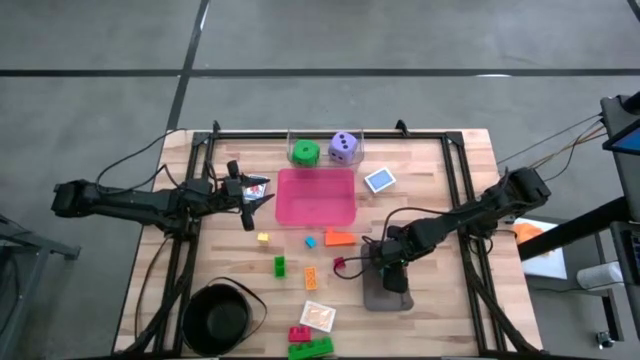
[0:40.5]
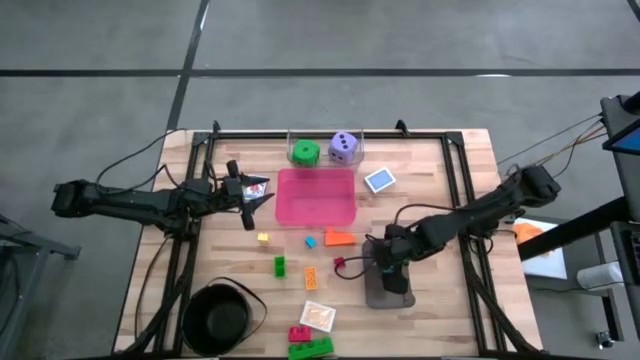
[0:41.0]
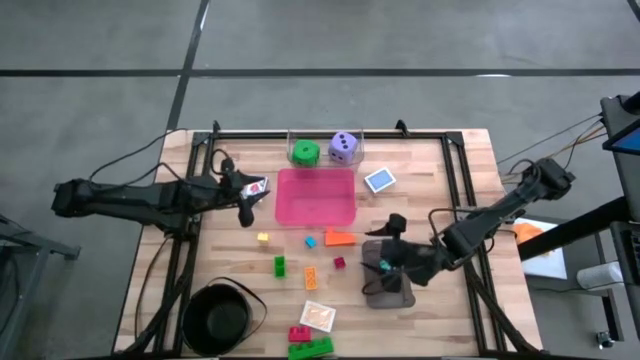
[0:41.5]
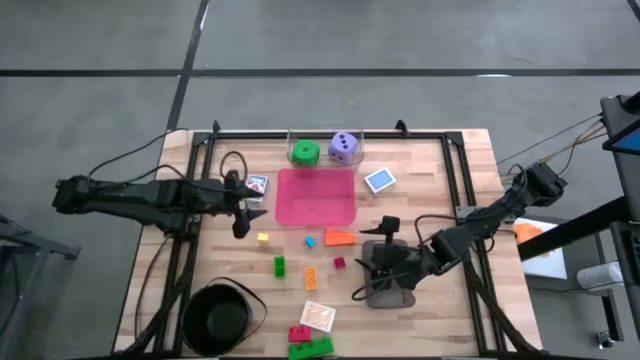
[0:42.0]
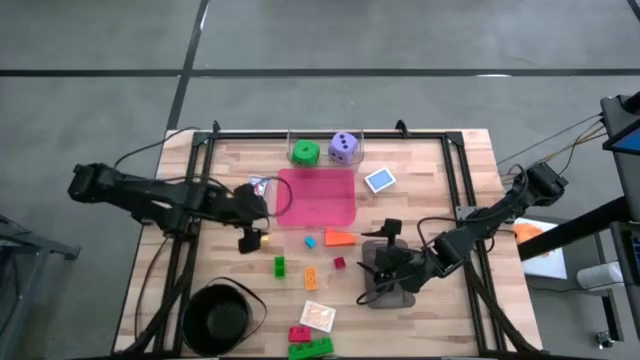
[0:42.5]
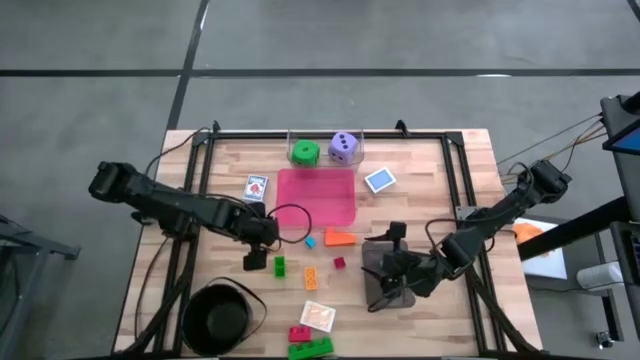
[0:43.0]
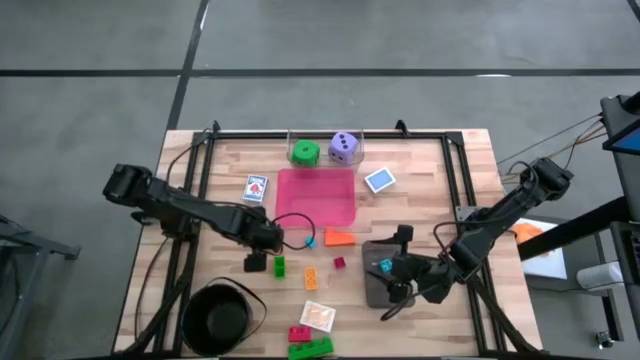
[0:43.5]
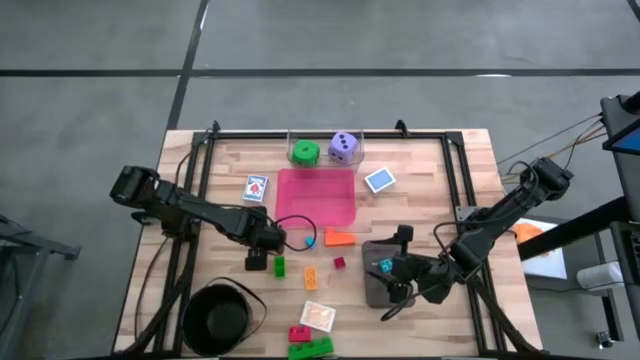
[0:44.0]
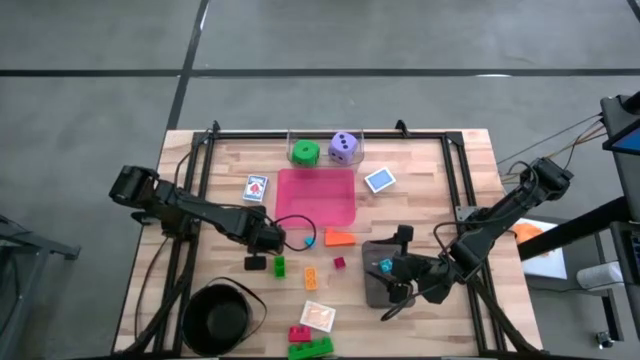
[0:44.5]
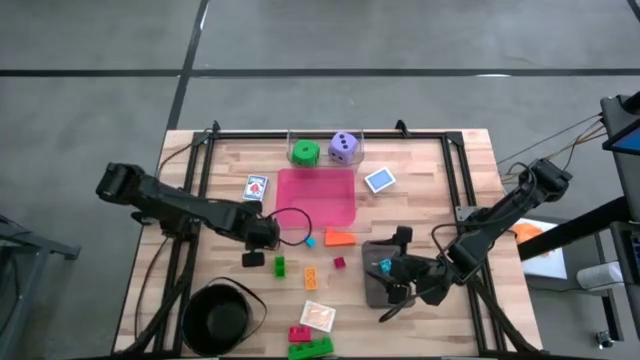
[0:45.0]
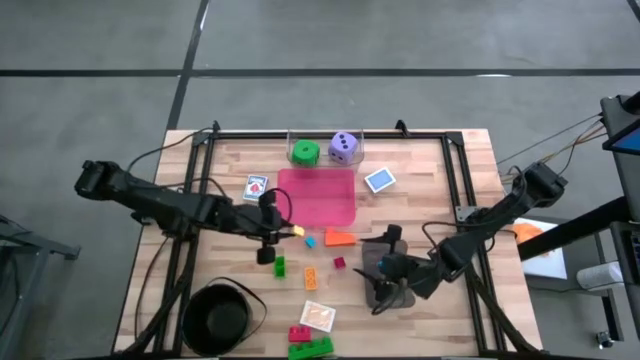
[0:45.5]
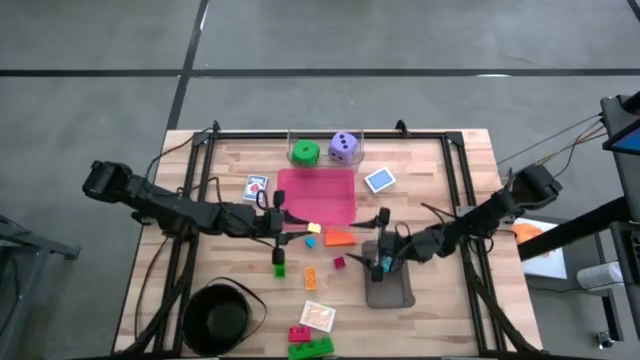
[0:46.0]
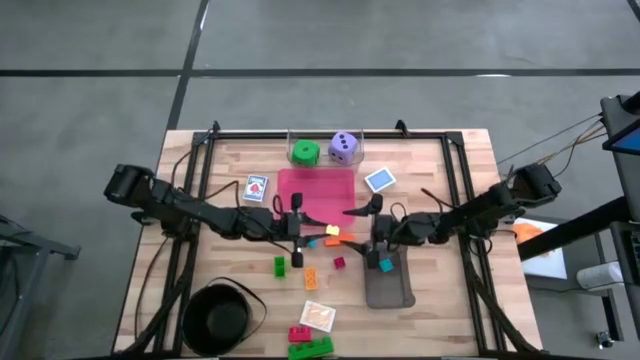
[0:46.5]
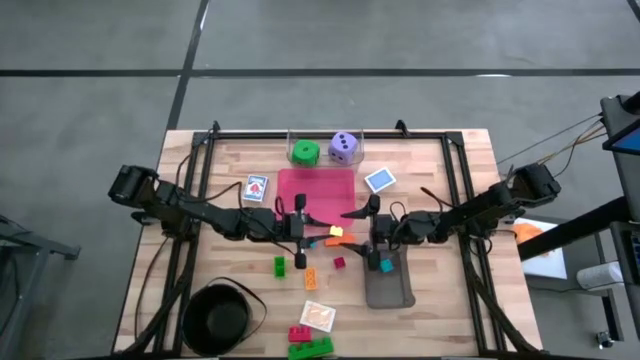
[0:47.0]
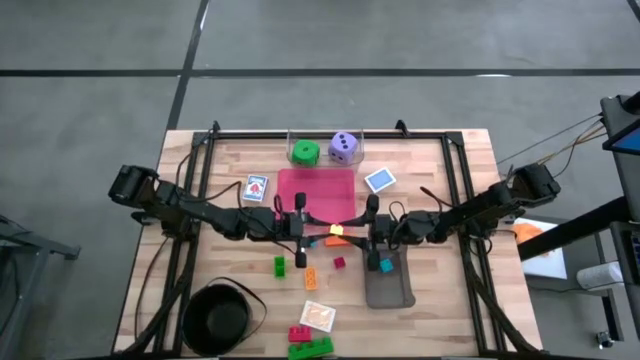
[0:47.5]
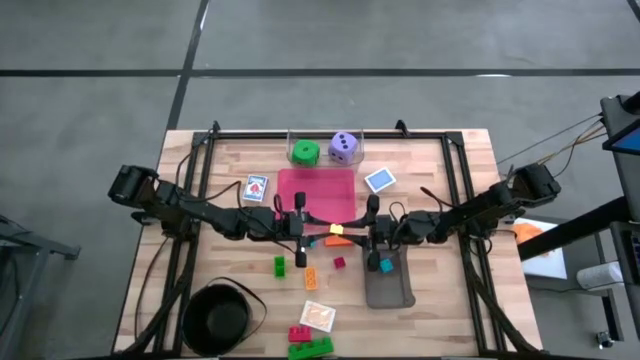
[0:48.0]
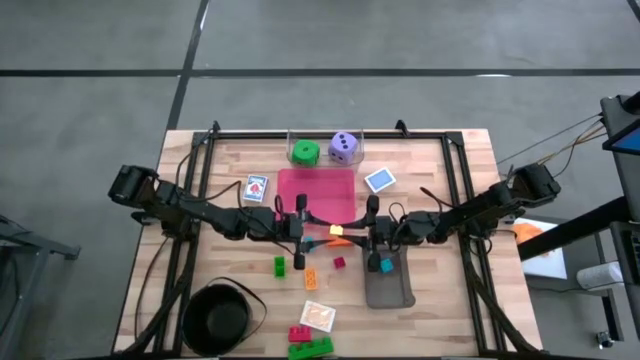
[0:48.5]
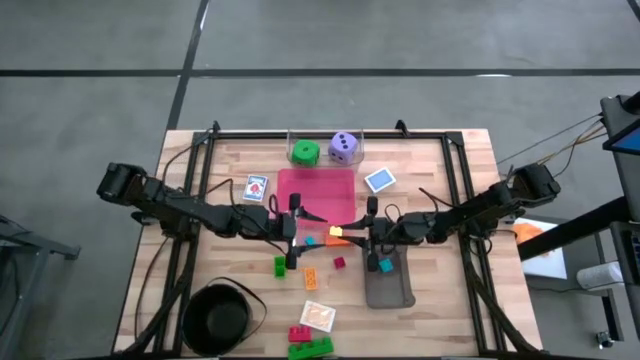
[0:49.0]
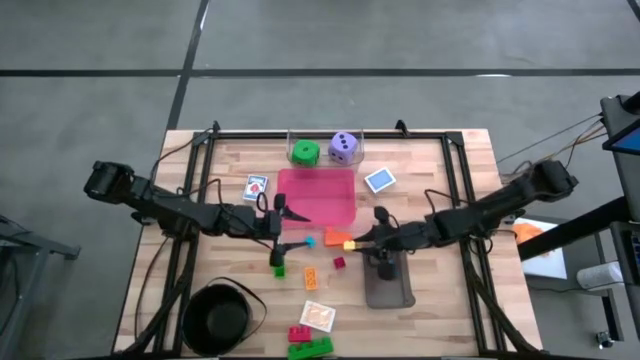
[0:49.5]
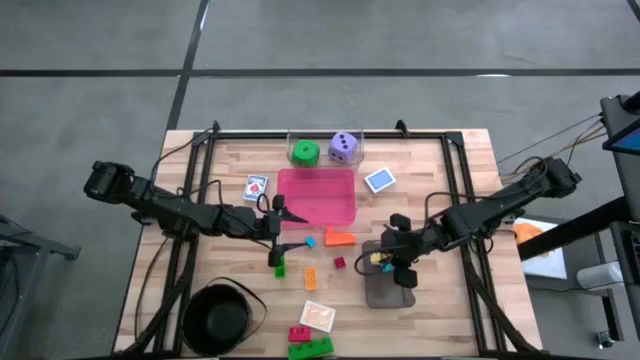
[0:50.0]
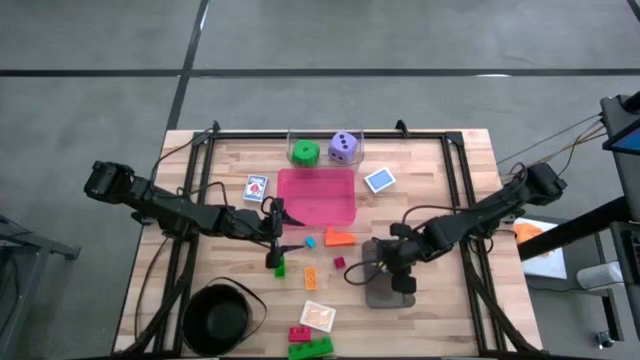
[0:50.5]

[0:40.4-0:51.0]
Task: Pick & Place Toys
Put the small yellow game piece into the black bin

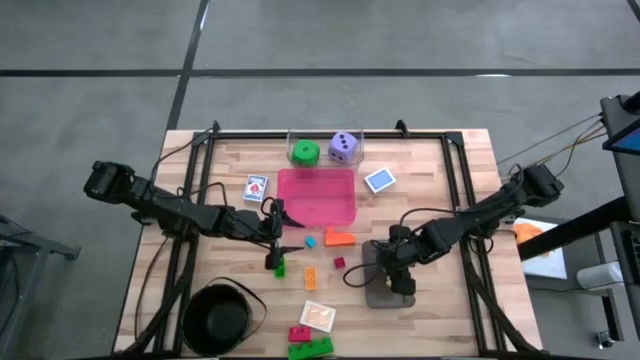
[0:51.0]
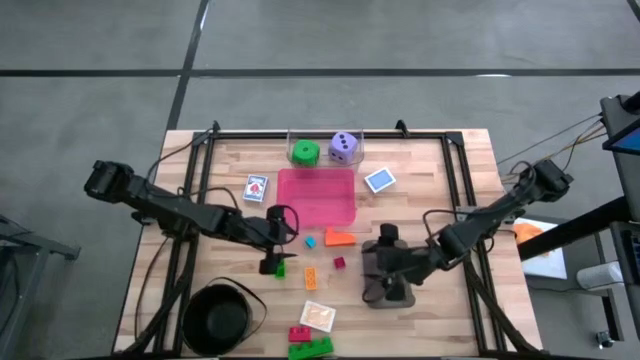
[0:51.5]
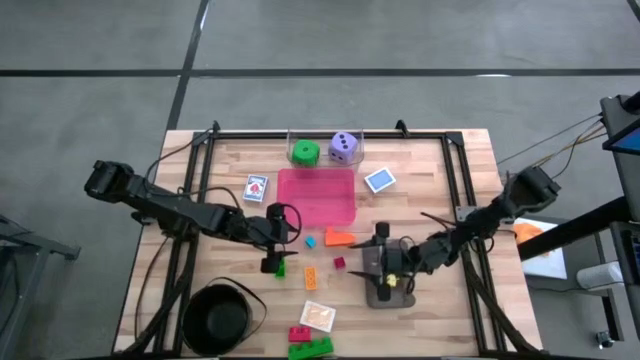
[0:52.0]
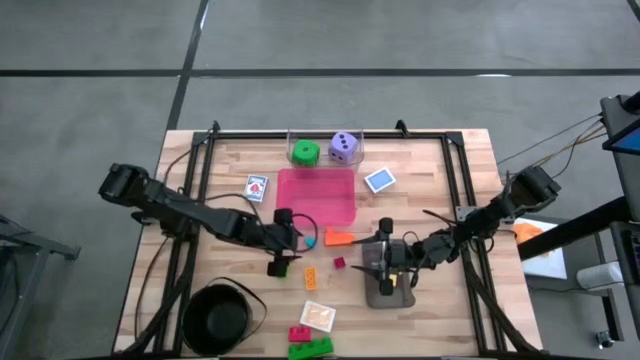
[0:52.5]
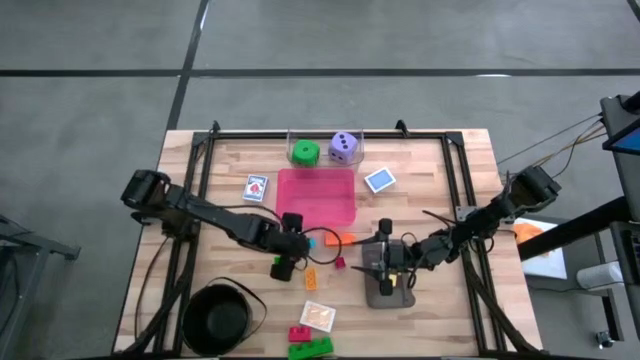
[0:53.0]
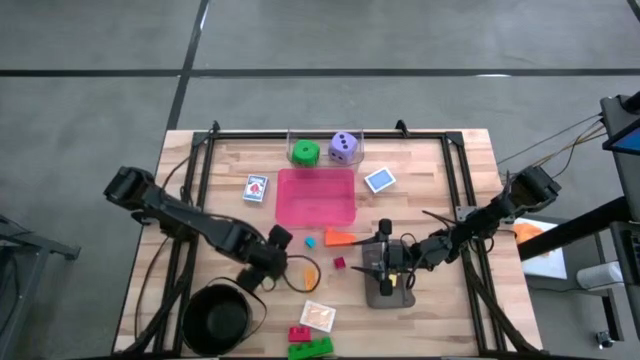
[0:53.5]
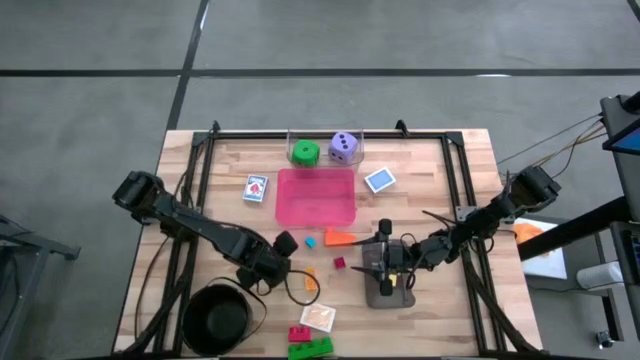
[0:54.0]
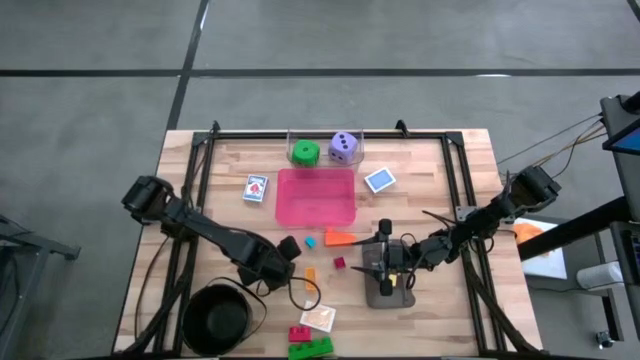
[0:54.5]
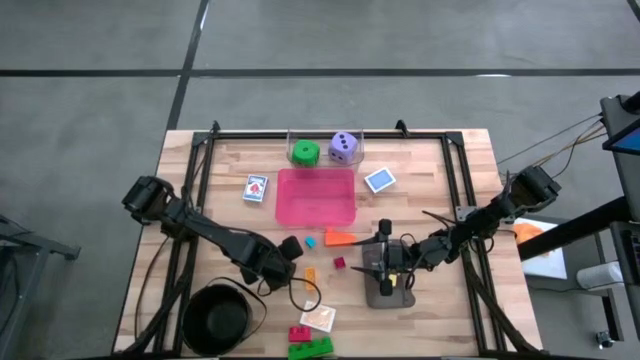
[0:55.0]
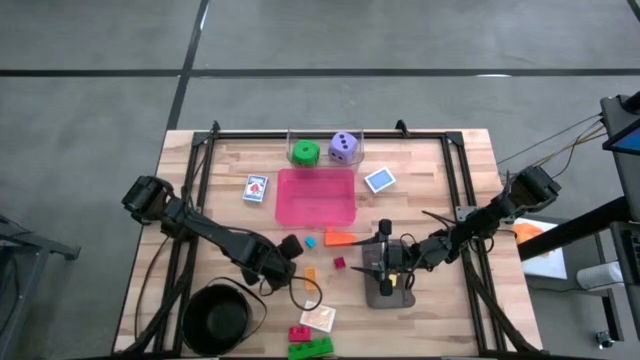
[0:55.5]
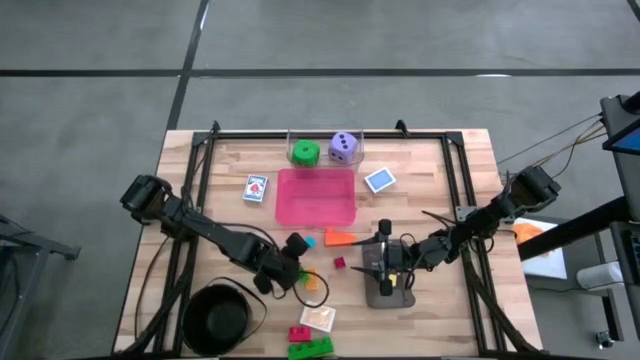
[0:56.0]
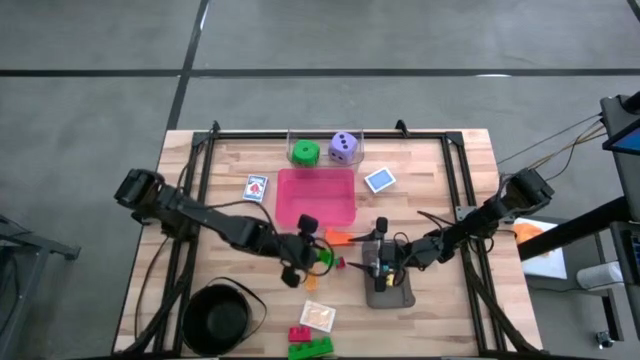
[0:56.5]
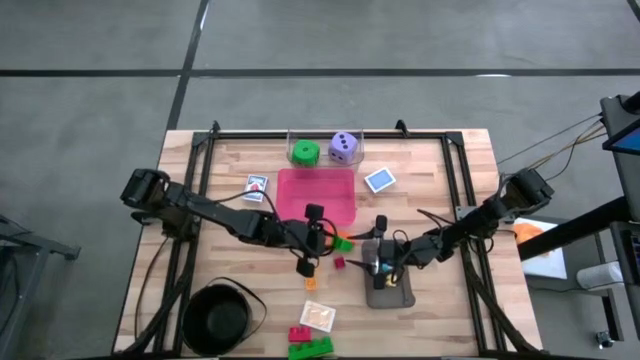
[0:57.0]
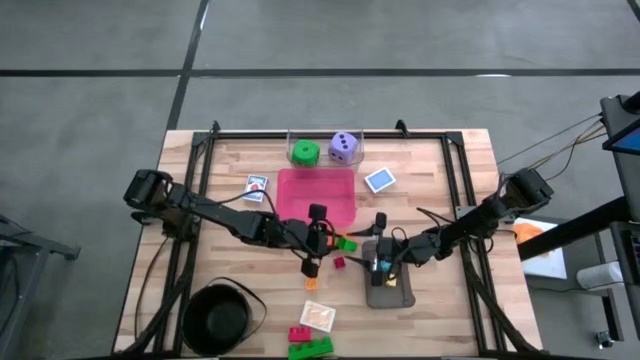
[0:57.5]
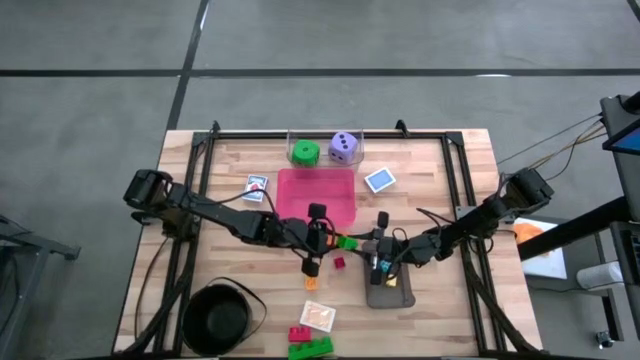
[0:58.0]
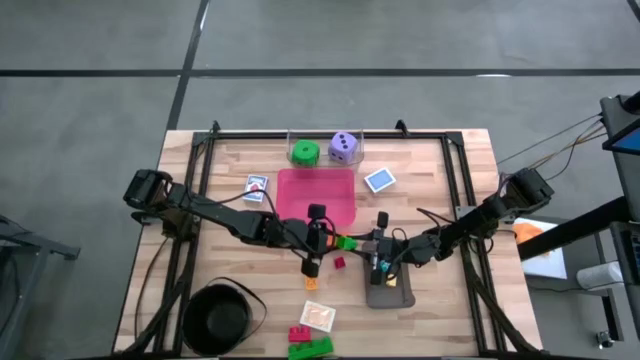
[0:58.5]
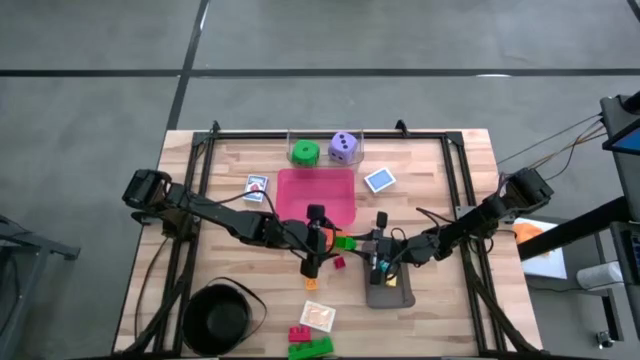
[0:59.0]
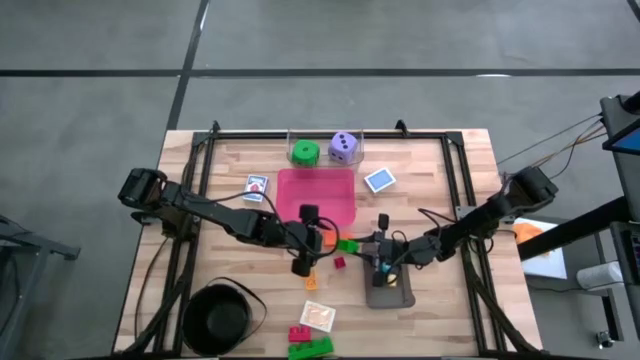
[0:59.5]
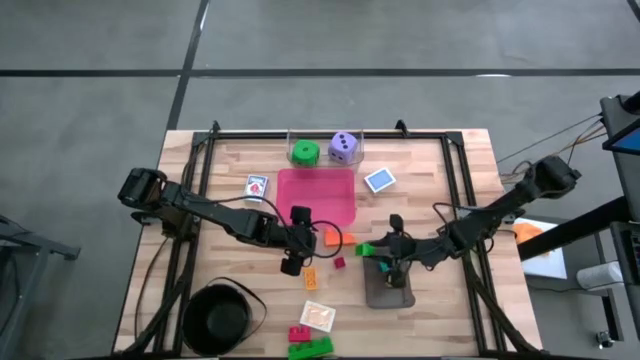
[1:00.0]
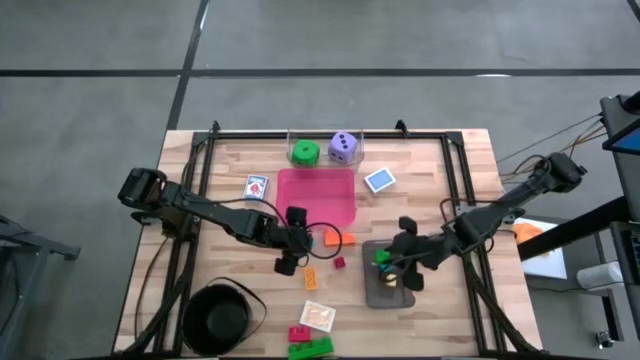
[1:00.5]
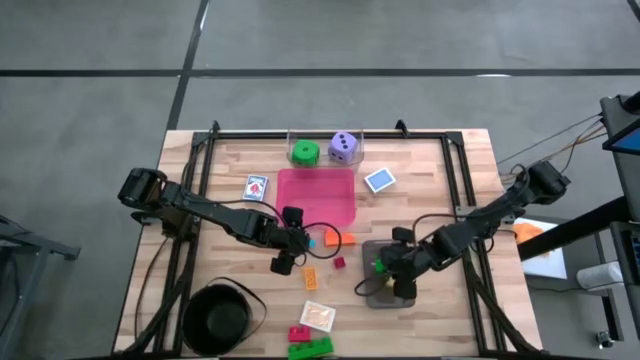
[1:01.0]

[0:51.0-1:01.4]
Put the top big green game piece into the black bin
